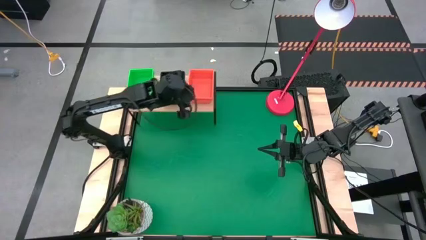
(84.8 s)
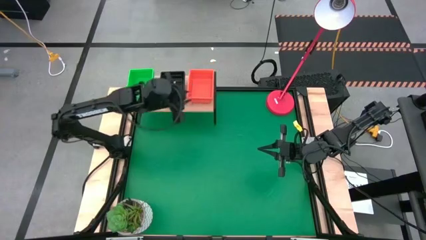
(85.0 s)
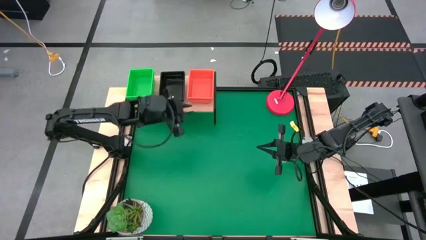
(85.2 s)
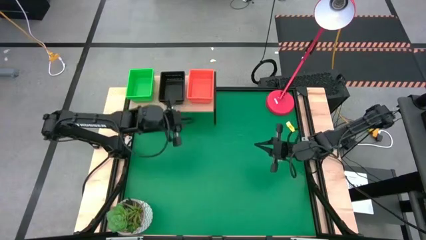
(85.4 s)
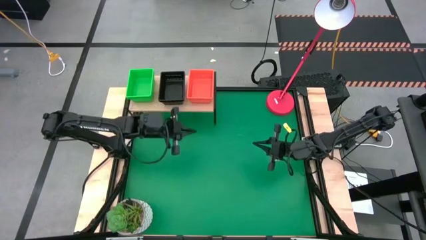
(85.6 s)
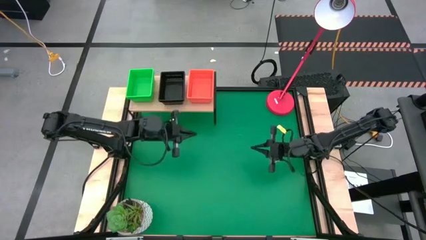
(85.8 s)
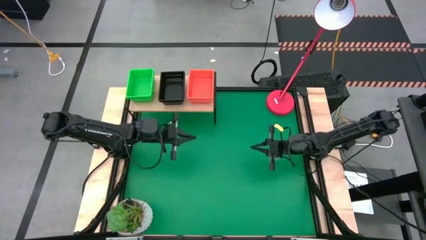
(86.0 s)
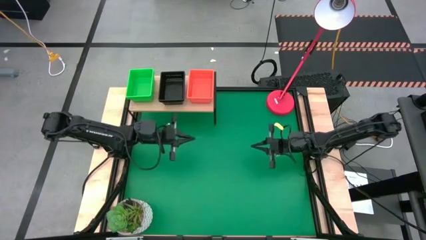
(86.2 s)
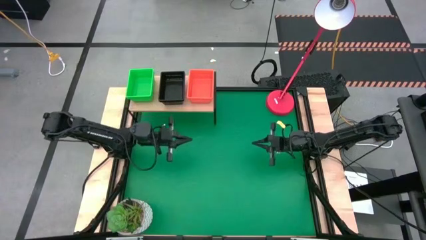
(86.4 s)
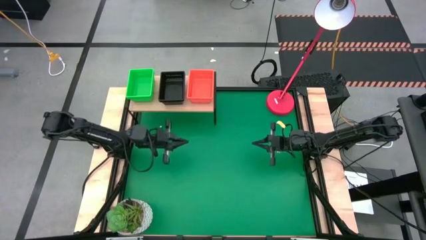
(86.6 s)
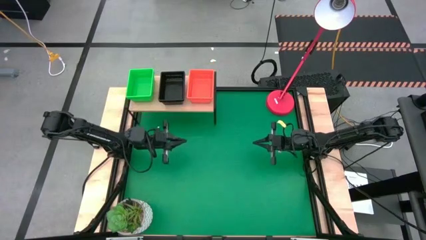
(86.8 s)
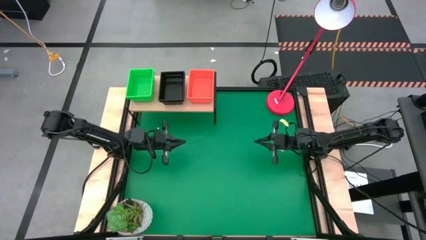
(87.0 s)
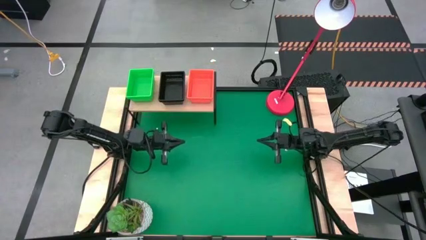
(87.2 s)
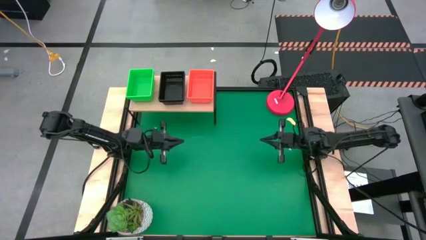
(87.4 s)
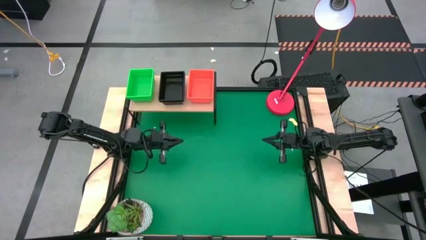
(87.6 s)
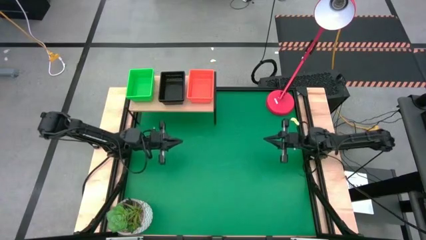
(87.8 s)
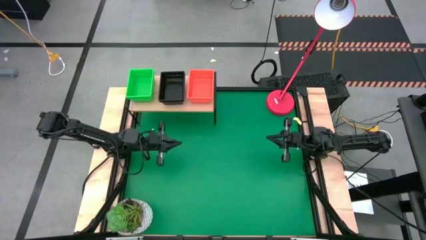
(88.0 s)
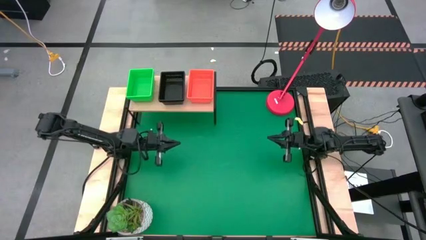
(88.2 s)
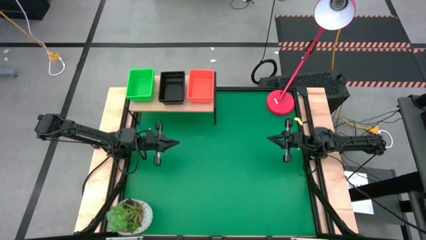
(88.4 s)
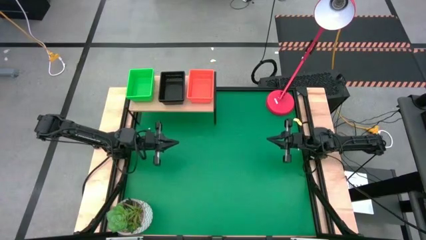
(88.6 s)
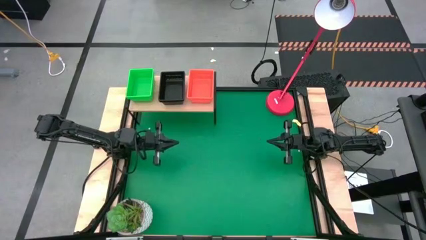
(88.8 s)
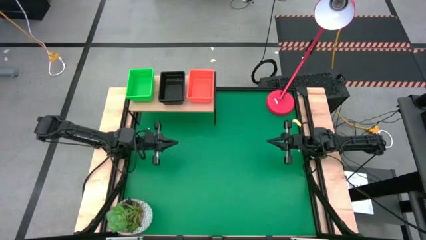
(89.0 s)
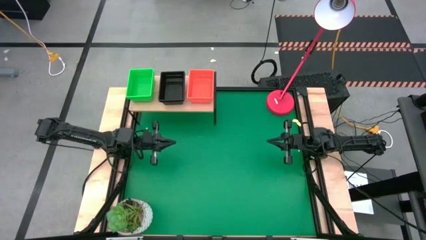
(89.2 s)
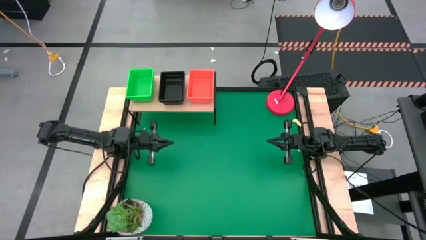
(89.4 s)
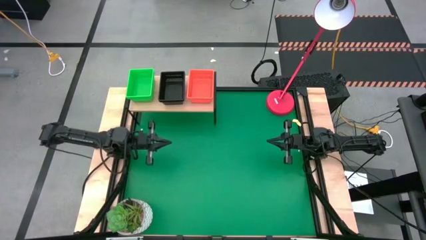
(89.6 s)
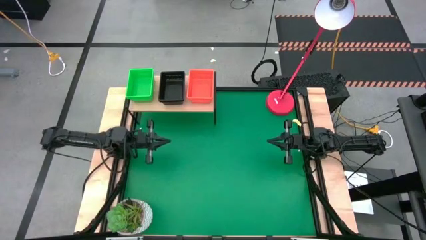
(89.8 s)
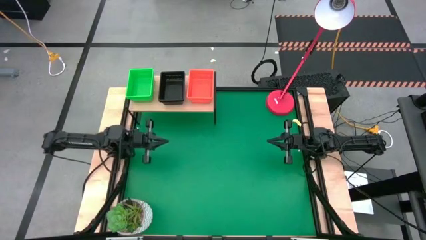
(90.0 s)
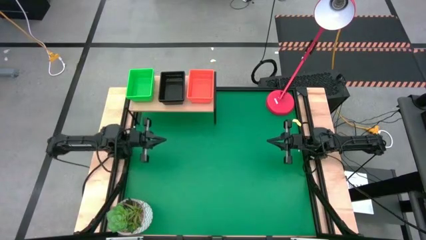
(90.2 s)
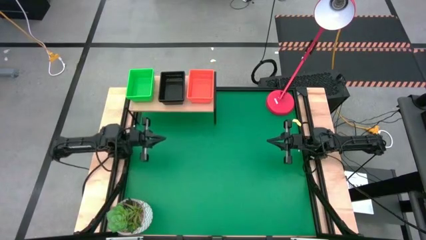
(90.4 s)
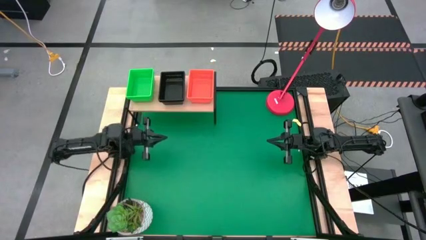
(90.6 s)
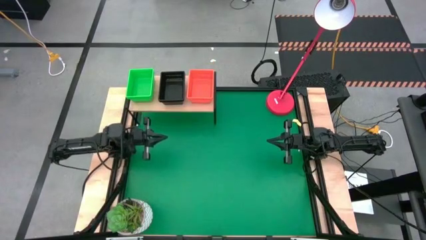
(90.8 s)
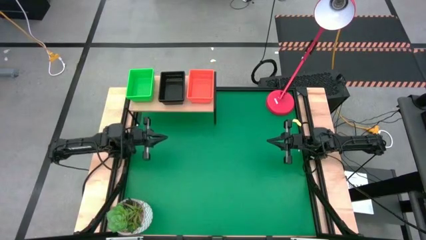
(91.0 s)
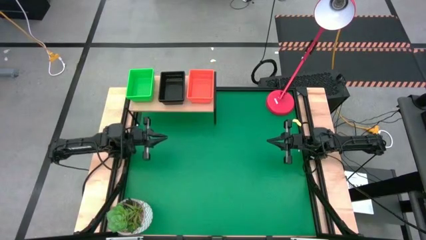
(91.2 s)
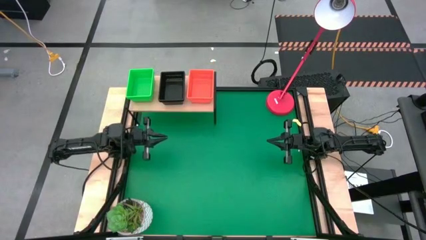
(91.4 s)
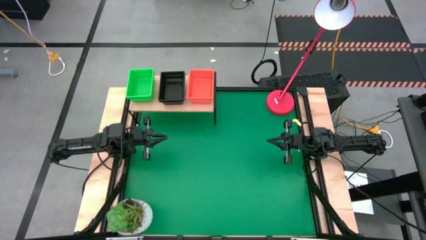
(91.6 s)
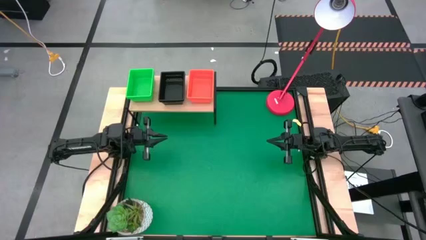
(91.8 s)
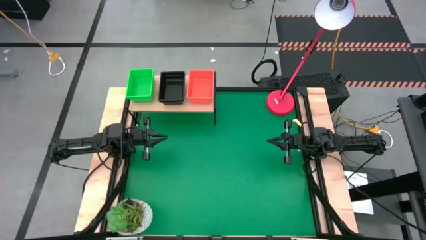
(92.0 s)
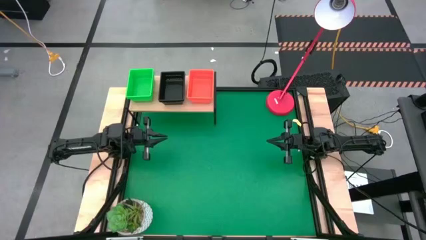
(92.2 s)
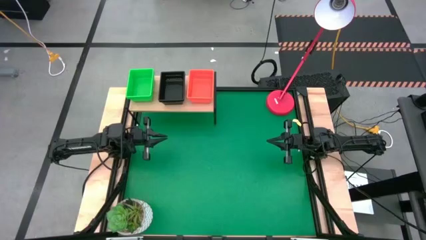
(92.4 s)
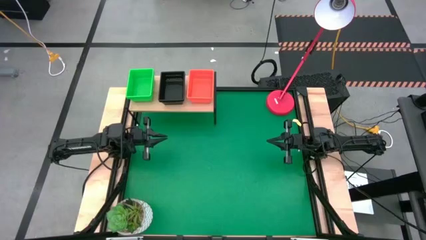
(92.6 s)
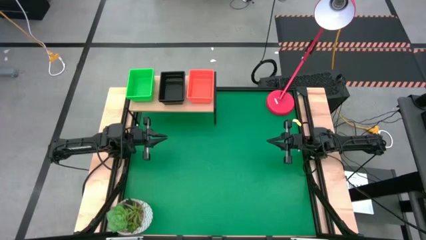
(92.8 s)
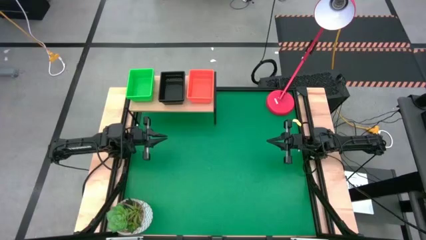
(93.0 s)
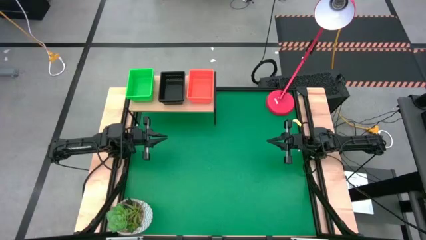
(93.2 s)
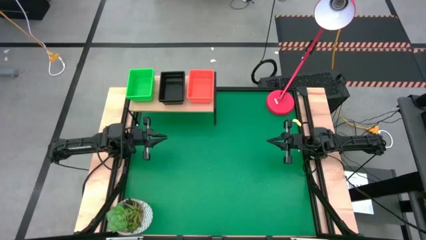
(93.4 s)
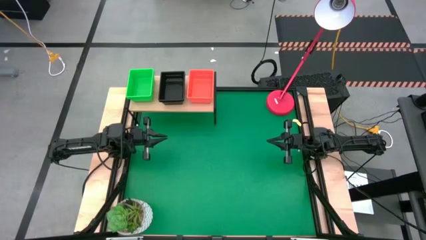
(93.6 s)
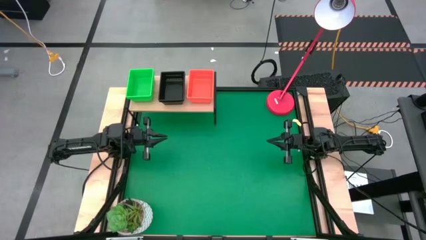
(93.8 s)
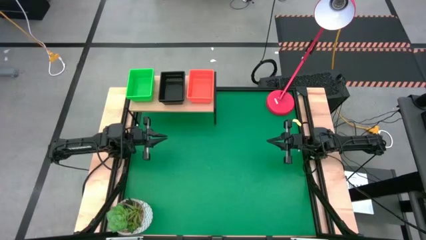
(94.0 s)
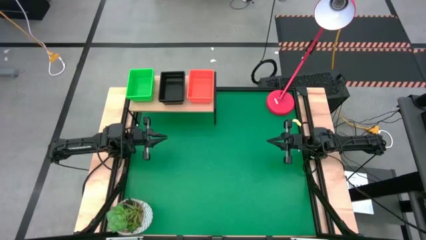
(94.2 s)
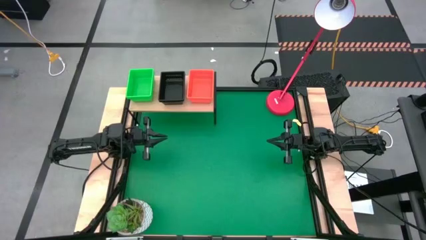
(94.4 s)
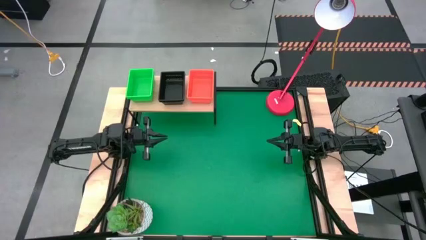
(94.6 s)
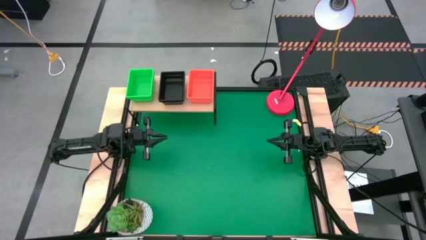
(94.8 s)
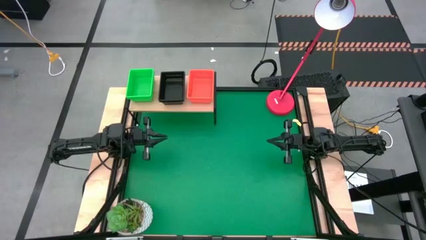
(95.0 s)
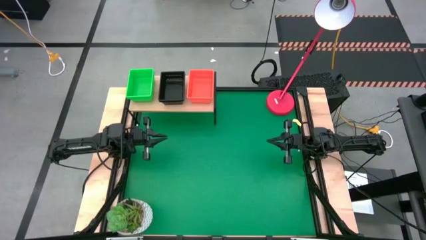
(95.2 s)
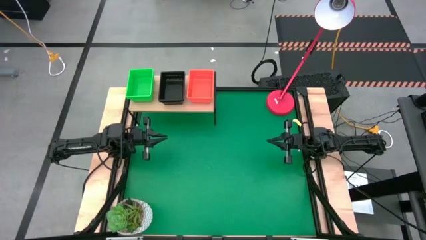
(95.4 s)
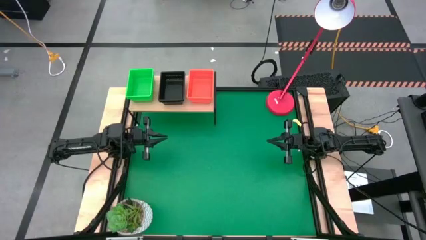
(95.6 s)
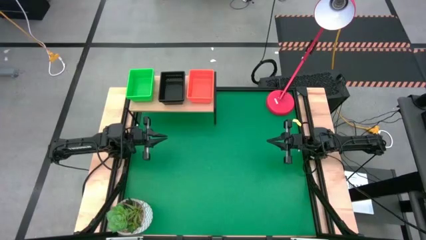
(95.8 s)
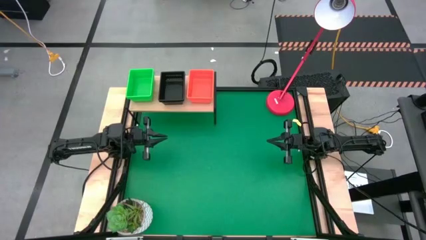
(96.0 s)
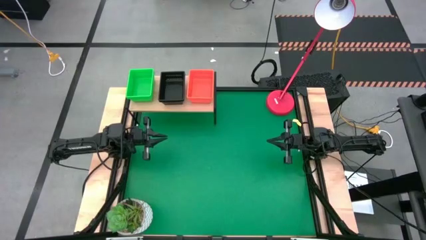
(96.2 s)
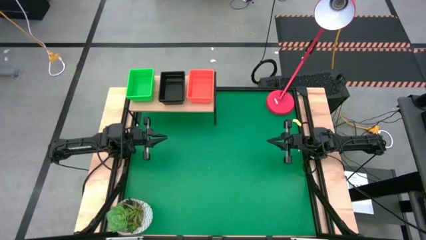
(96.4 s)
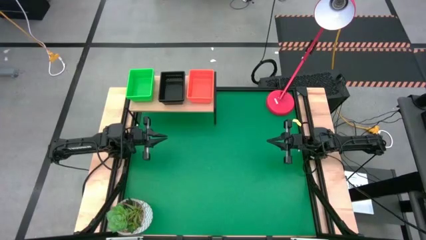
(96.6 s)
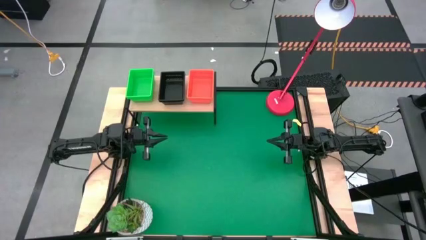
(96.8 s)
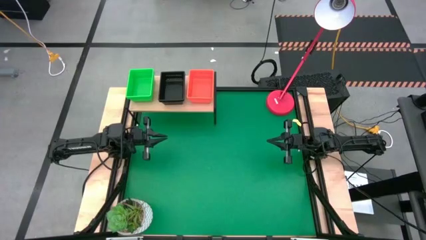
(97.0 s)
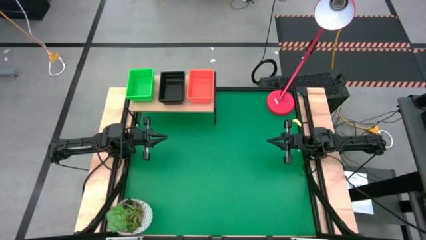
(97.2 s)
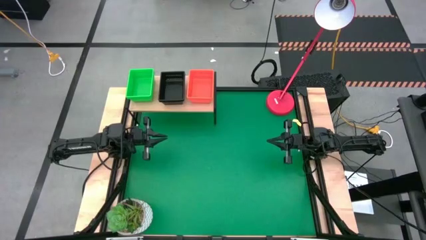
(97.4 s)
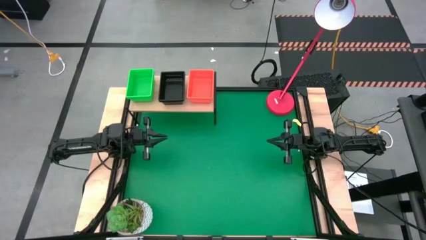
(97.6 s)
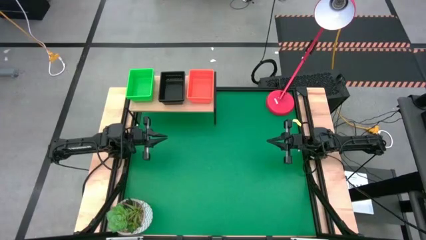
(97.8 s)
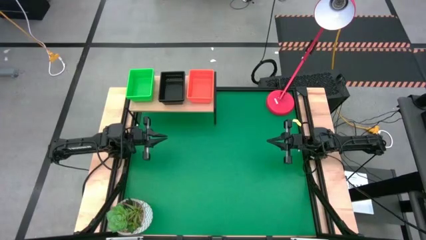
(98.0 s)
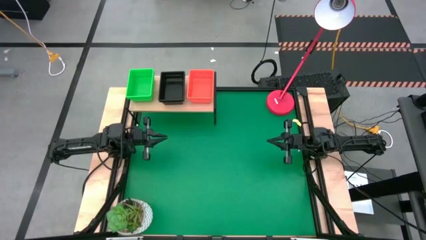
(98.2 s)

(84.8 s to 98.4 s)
Task: Stack baskets on shelf by color
Return to Home Position

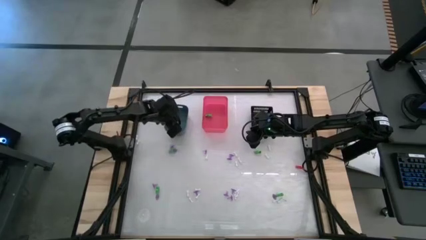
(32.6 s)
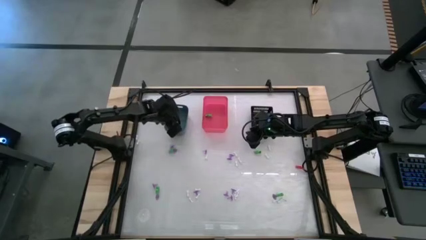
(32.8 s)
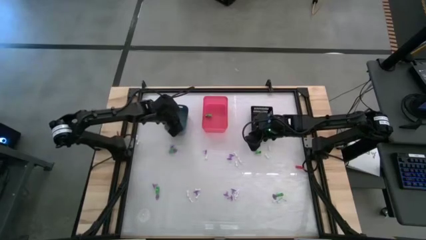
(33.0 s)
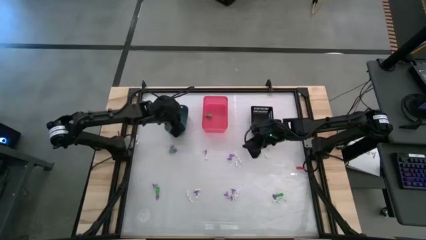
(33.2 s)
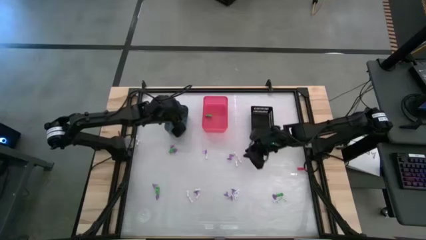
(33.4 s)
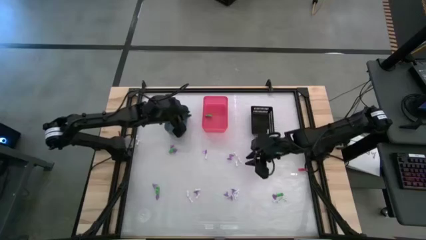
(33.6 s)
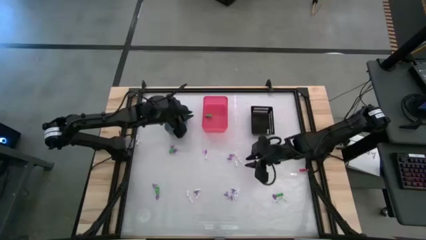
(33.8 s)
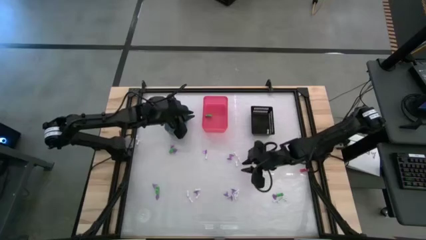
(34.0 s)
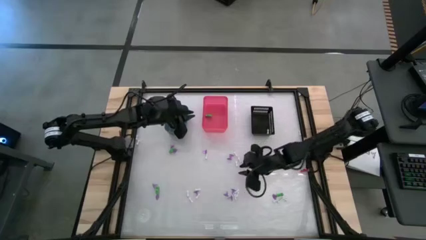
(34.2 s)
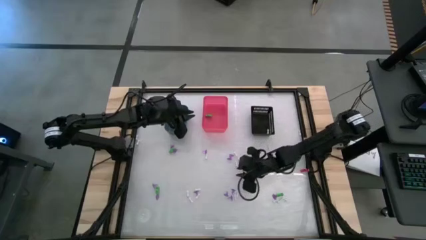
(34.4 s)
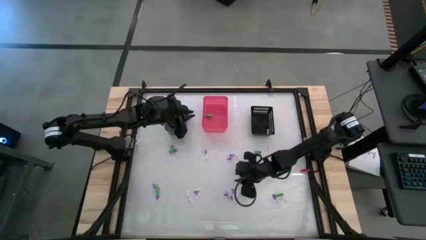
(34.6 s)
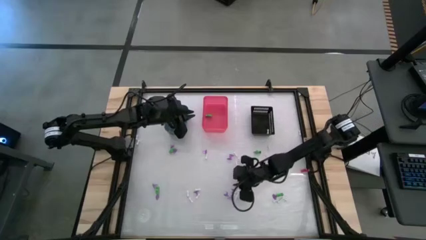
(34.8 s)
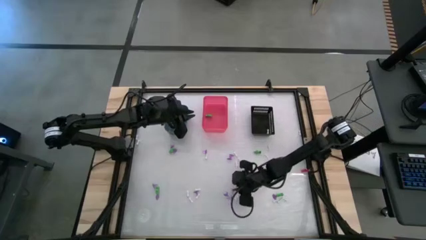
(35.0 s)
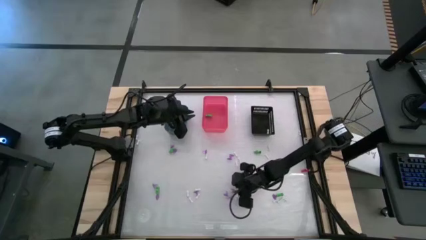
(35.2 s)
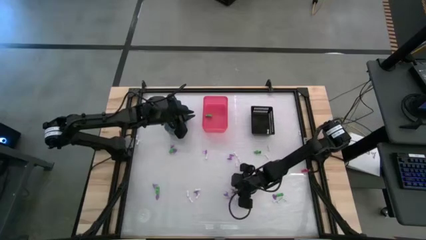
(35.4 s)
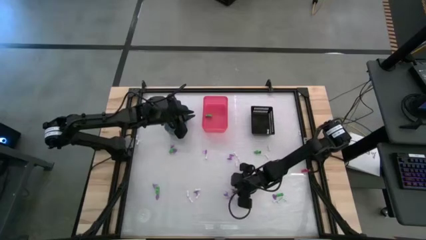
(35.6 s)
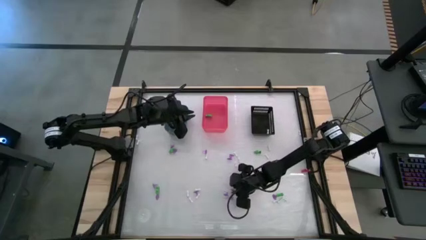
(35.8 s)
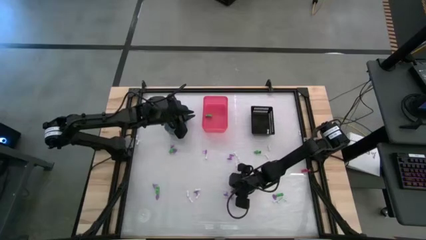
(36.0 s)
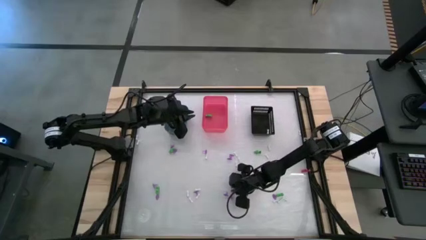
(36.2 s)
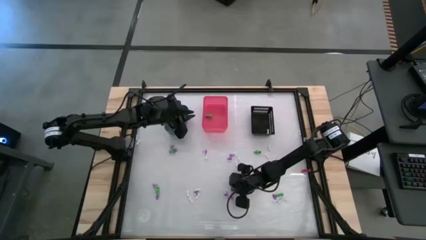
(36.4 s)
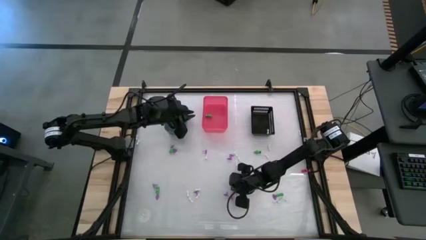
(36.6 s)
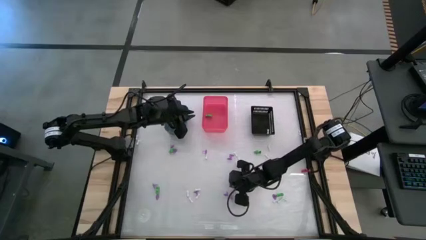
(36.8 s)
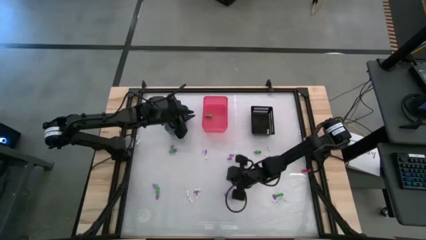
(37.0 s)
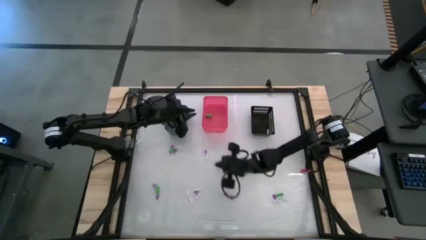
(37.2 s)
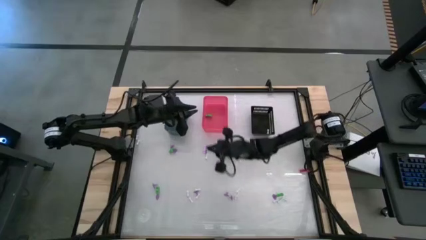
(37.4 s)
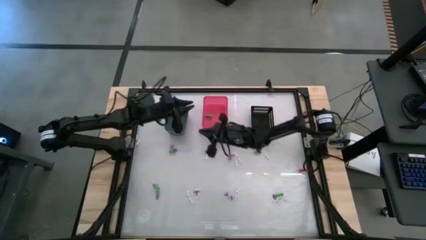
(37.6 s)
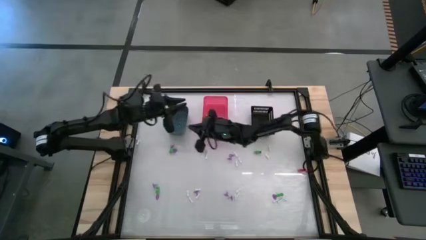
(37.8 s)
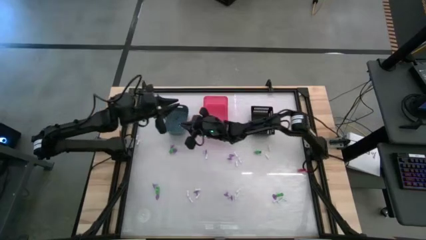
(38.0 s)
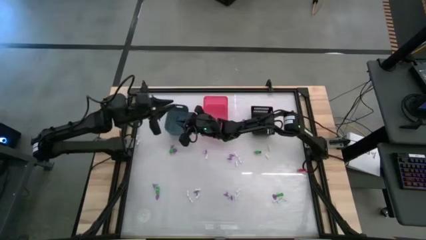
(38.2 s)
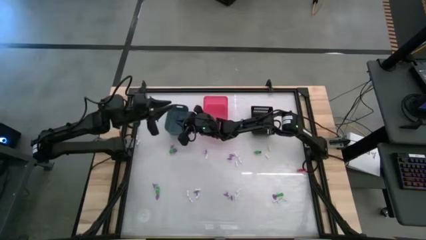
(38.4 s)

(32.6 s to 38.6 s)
Task: Sort Halloween decoration
Put the purple witch hat toy into the blue bin
